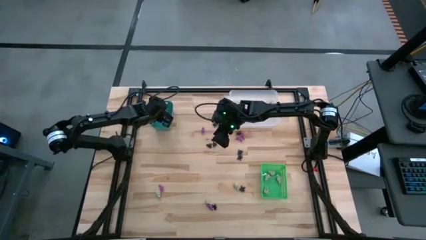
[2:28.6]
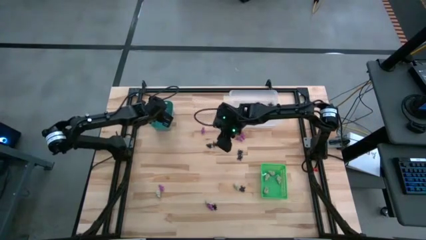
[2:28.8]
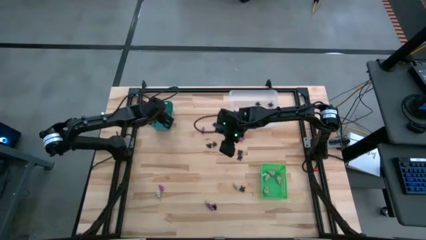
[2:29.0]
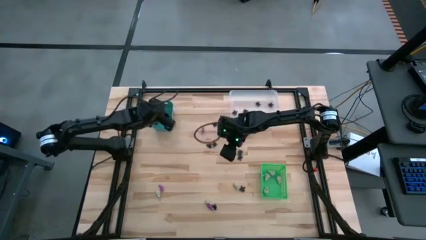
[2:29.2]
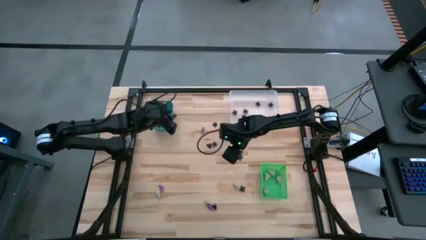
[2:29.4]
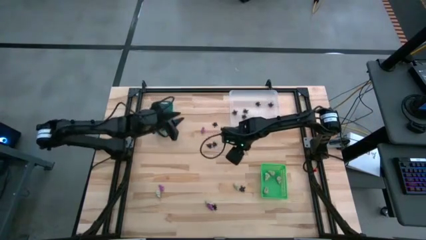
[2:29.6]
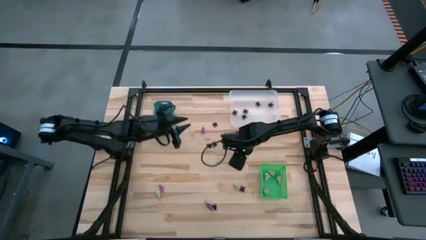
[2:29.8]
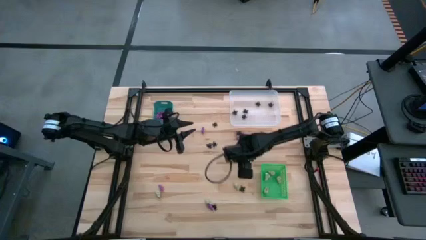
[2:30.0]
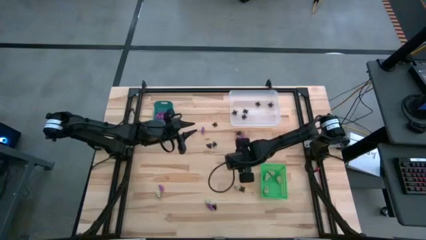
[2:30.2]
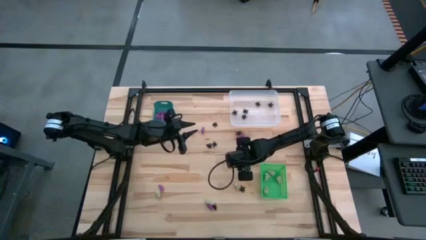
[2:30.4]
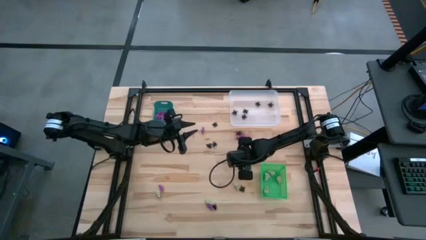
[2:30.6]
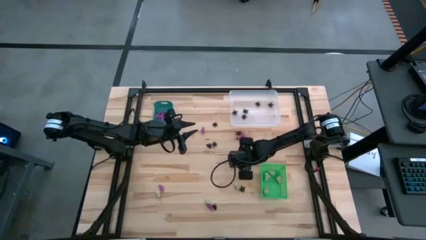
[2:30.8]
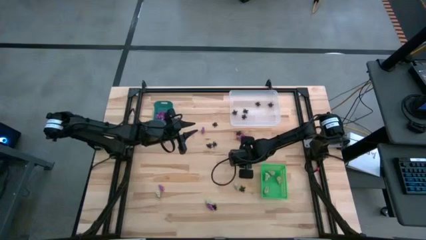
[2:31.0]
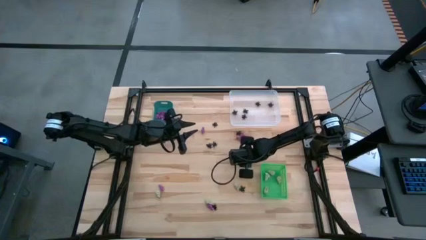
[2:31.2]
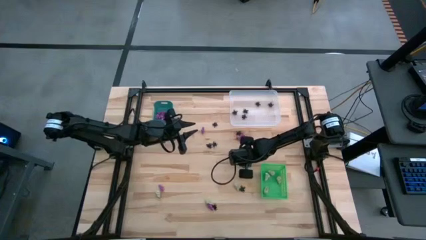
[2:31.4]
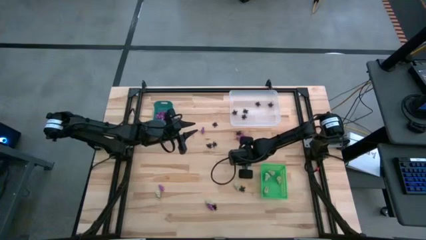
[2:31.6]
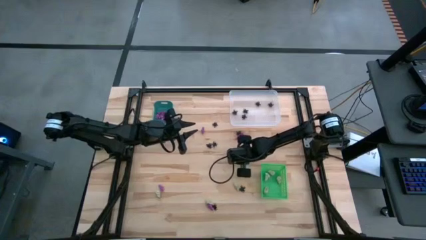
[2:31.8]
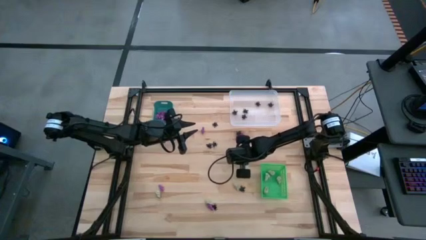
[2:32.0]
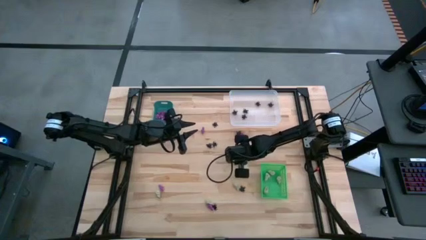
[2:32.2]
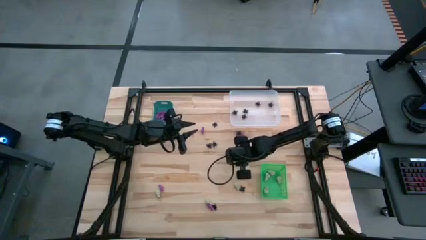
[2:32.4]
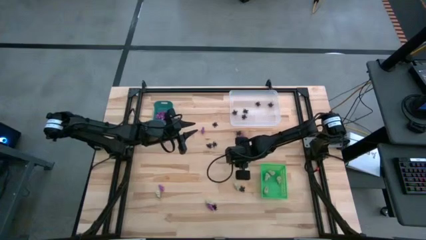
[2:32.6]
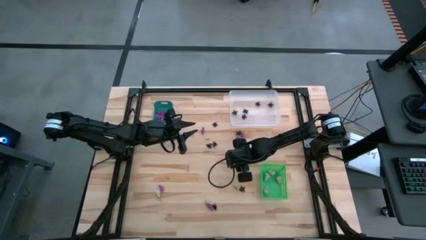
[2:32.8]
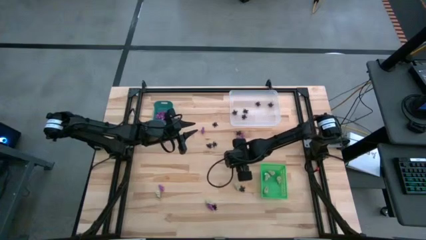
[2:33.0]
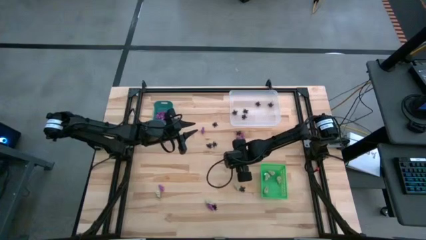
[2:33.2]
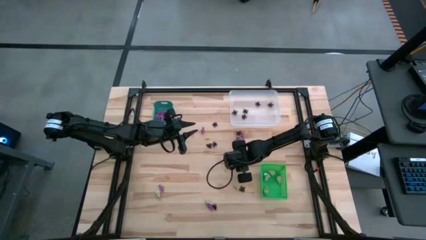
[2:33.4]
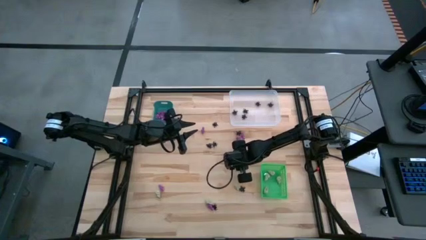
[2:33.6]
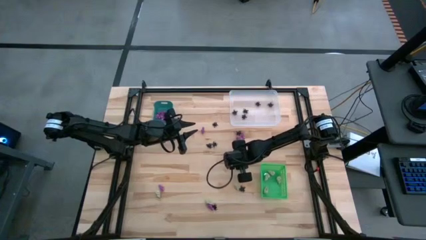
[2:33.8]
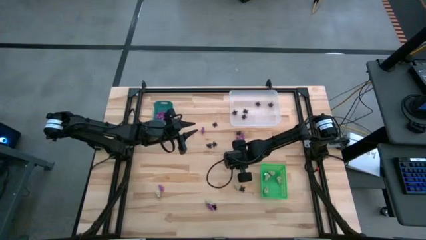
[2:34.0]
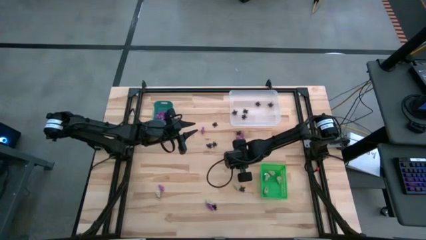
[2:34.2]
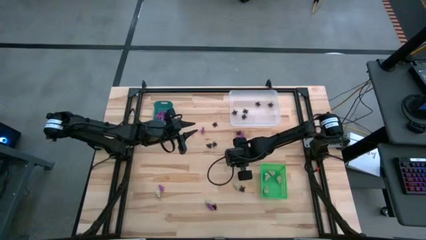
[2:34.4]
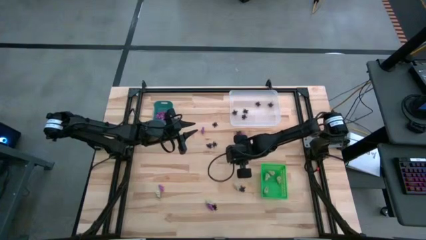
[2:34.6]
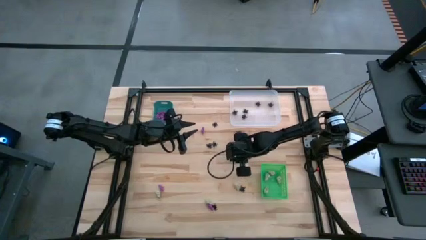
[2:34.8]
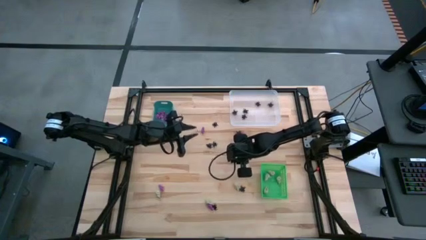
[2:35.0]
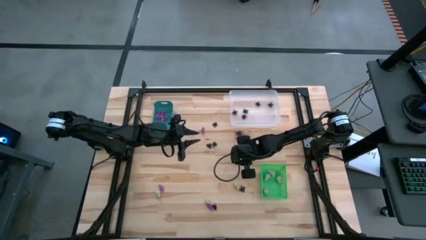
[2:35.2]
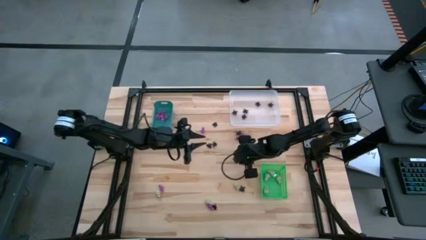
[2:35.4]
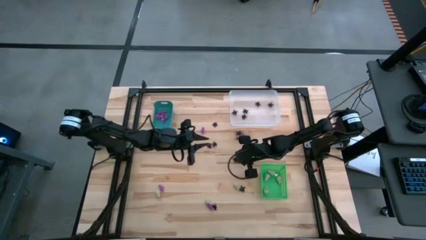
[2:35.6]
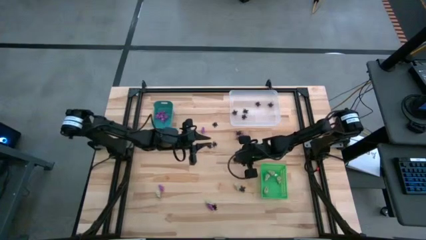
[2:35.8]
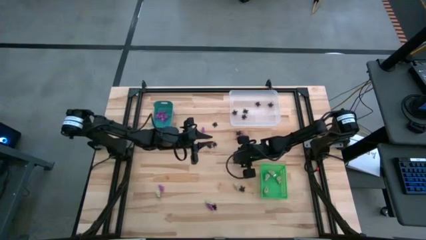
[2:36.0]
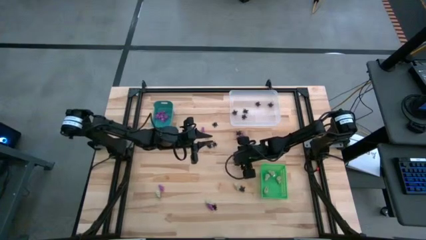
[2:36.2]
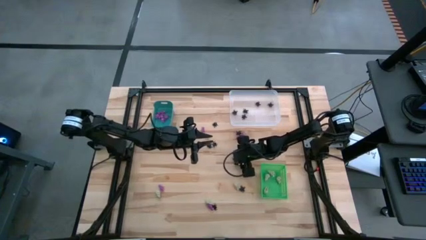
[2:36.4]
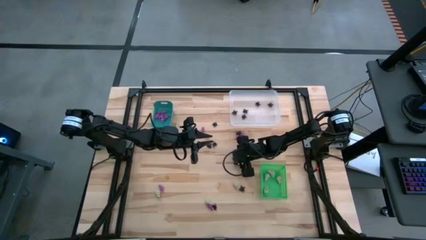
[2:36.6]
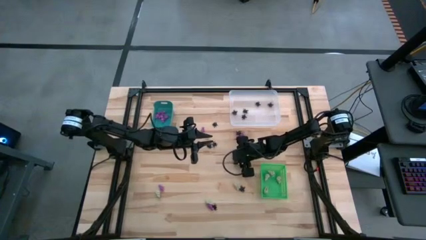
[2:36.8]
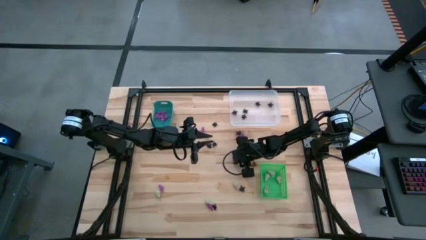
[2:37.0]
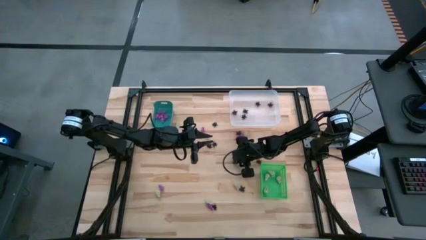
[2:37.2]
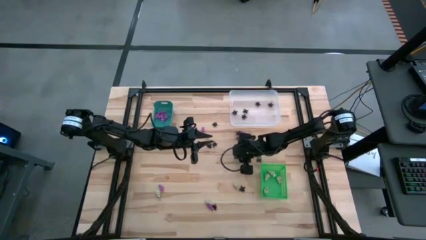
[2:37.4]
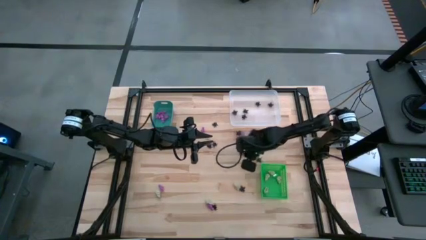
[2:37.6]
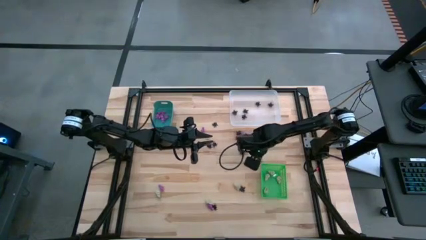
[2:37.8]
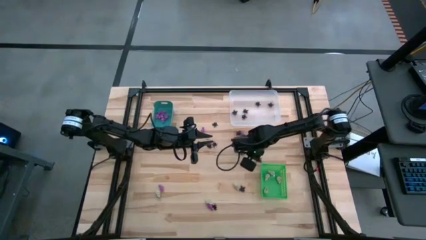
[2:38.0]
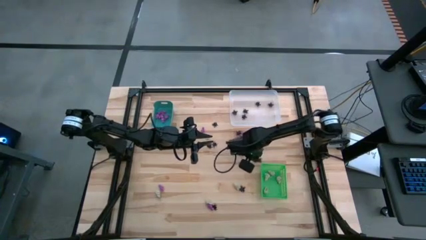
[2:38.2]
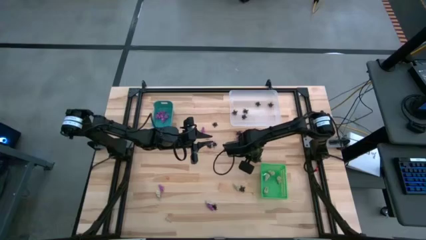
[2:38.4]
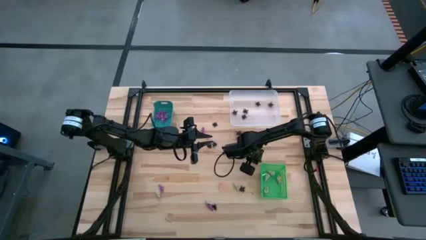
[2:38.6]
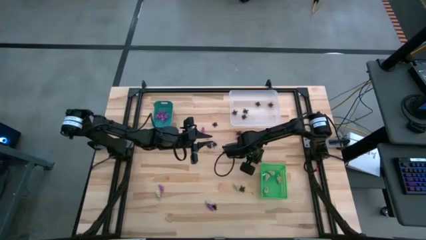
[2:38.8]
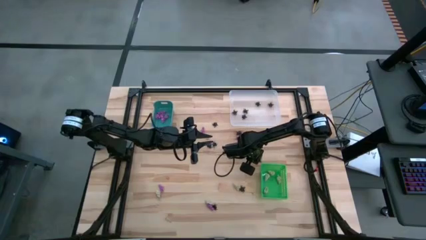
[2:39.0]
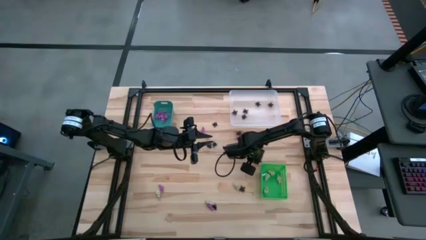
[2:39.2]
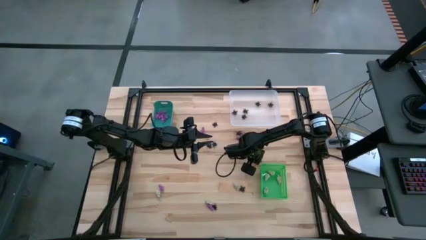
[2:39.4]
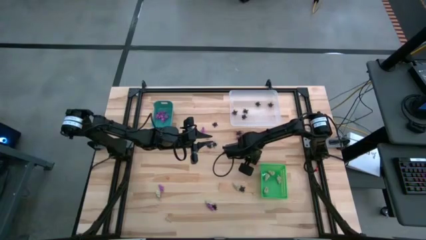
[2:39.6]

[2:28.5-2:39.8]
Task: Sort Halloween decoration
Put the black spider toy into the white bin
